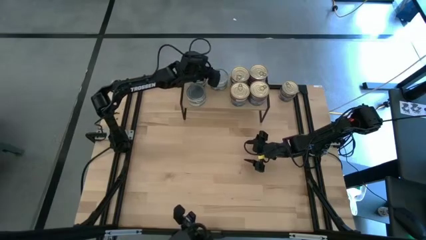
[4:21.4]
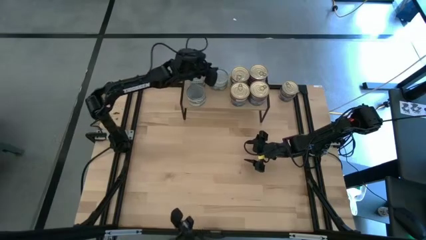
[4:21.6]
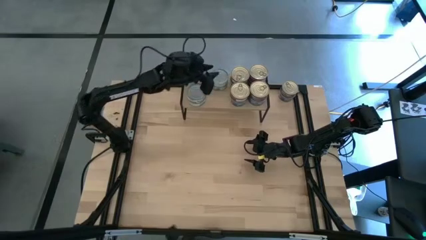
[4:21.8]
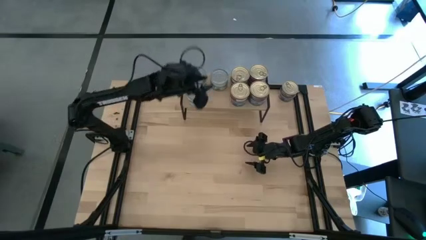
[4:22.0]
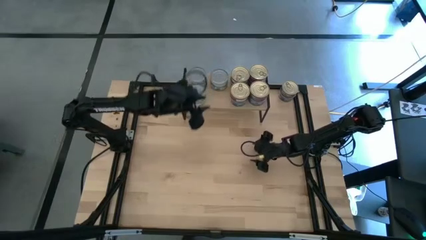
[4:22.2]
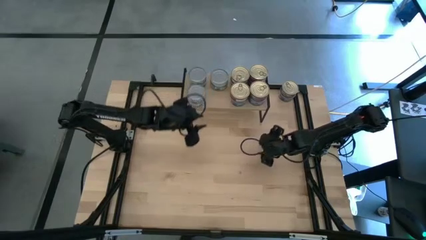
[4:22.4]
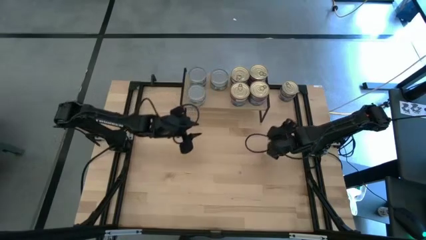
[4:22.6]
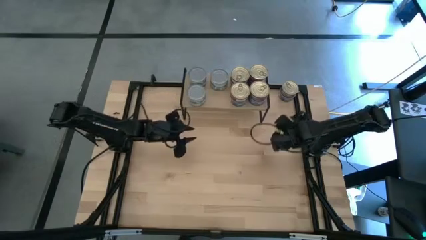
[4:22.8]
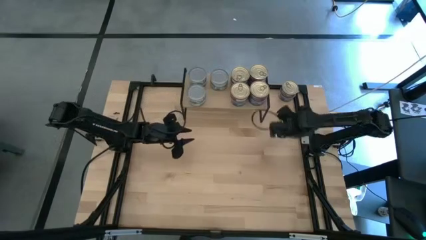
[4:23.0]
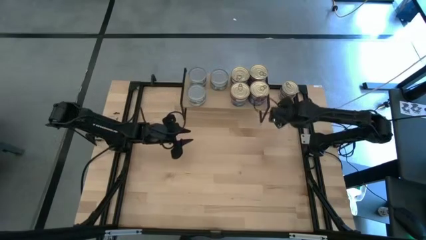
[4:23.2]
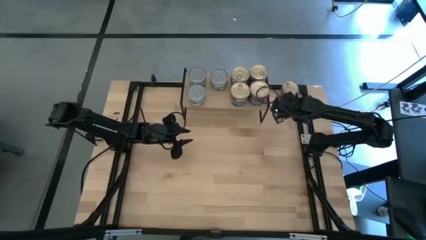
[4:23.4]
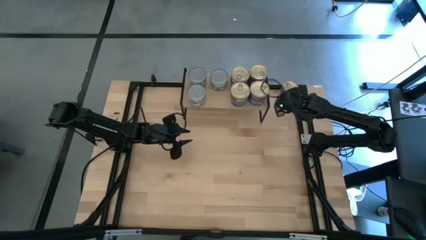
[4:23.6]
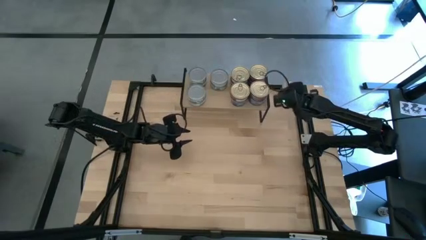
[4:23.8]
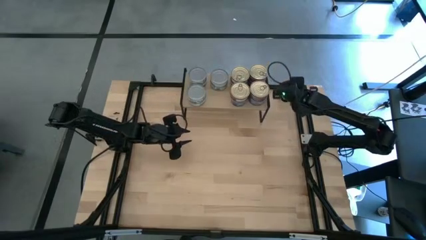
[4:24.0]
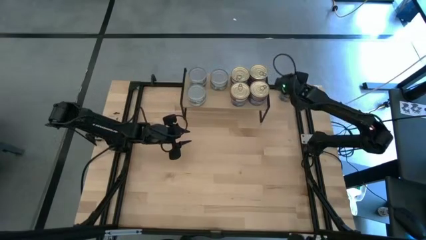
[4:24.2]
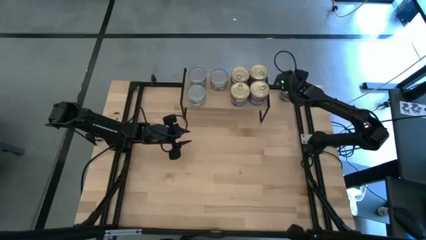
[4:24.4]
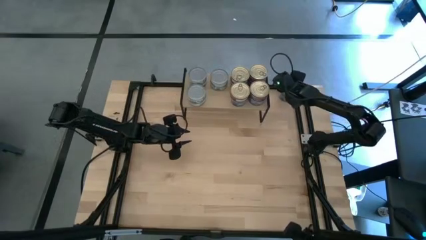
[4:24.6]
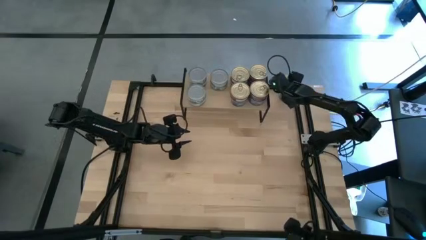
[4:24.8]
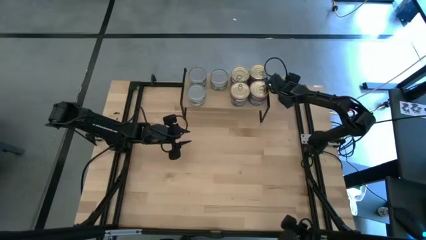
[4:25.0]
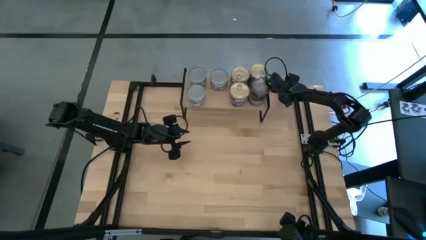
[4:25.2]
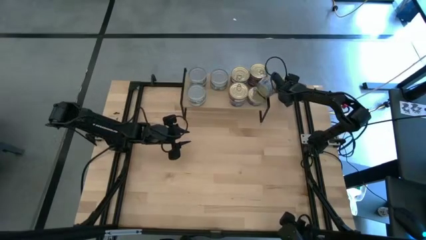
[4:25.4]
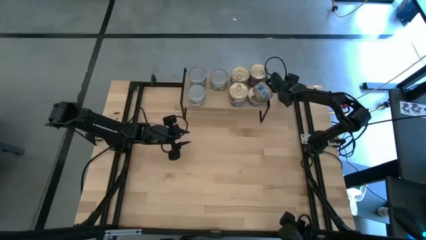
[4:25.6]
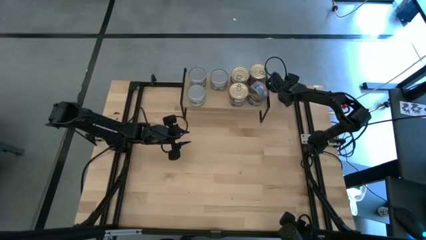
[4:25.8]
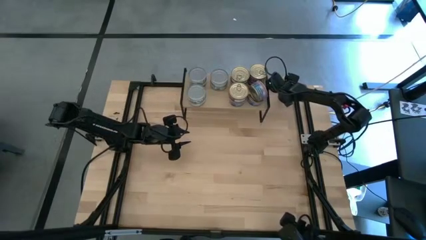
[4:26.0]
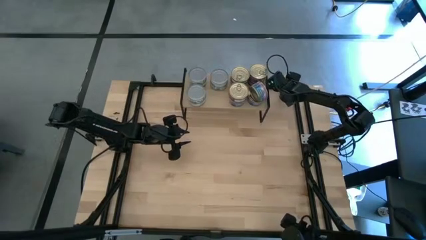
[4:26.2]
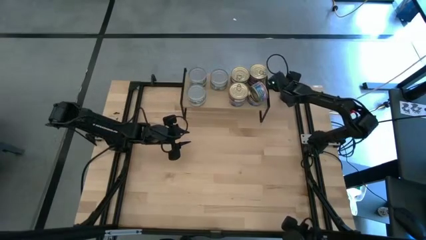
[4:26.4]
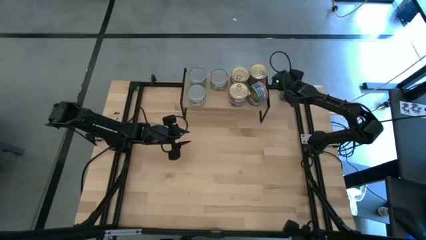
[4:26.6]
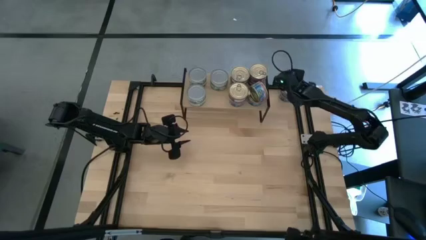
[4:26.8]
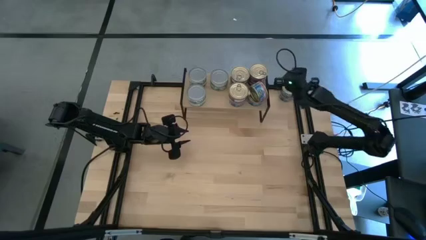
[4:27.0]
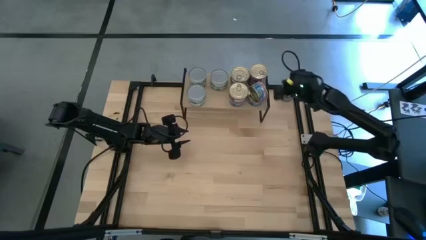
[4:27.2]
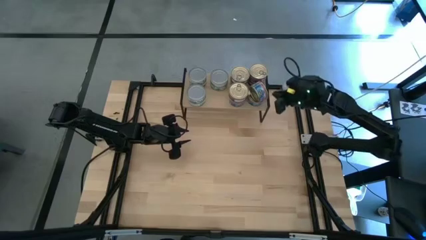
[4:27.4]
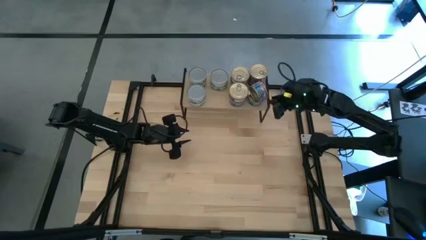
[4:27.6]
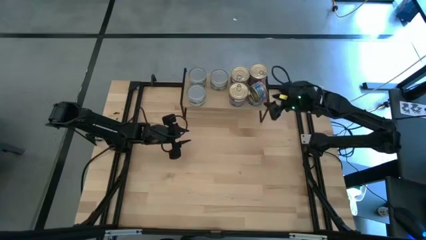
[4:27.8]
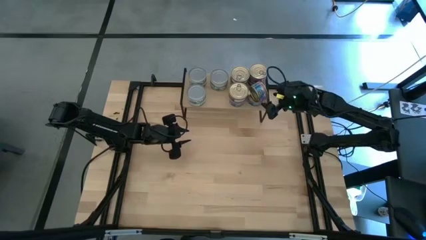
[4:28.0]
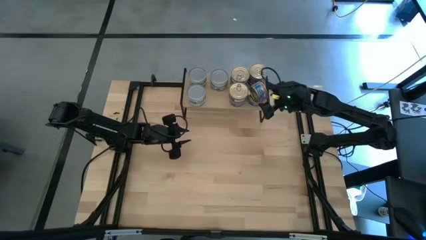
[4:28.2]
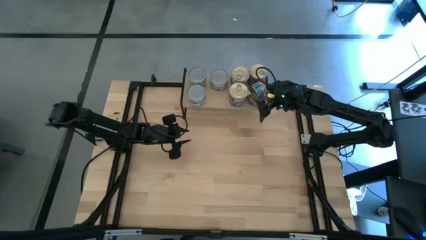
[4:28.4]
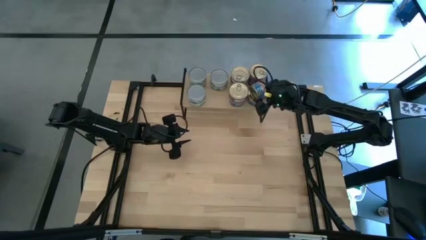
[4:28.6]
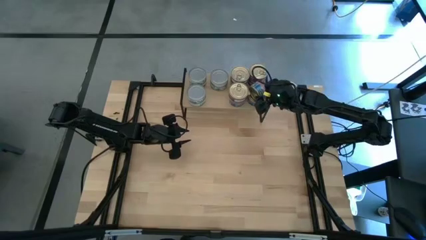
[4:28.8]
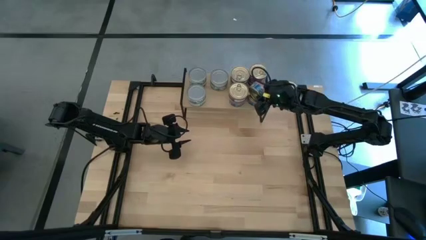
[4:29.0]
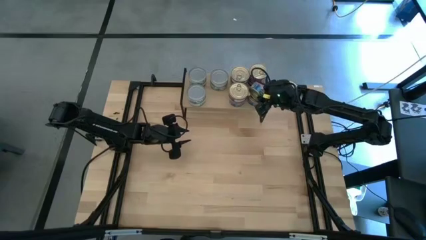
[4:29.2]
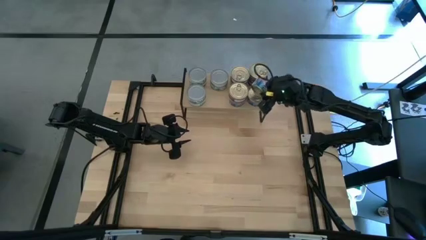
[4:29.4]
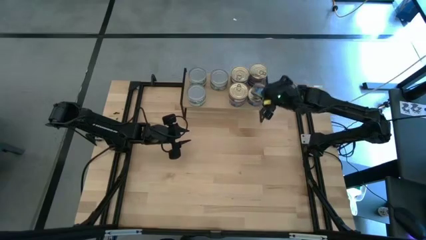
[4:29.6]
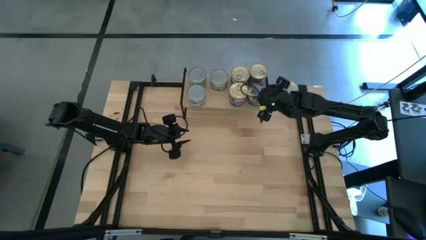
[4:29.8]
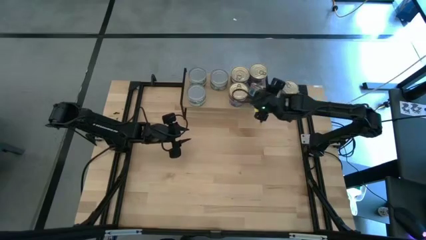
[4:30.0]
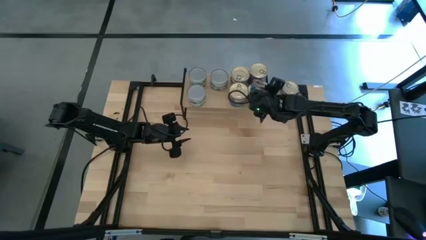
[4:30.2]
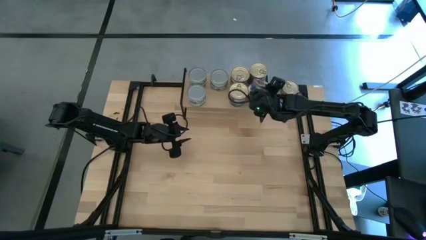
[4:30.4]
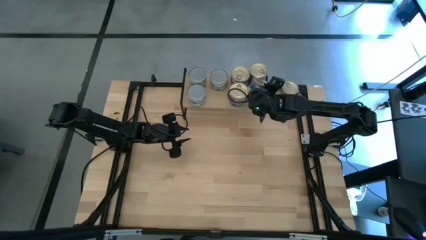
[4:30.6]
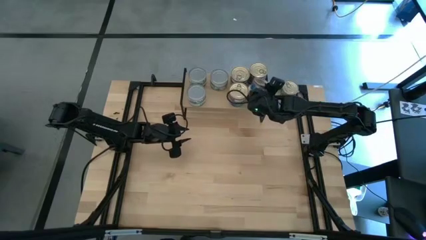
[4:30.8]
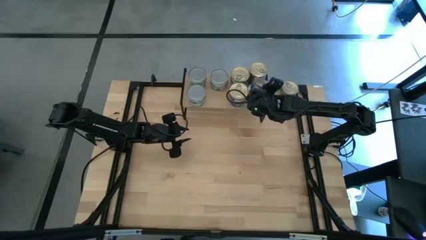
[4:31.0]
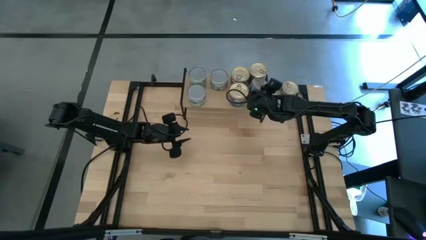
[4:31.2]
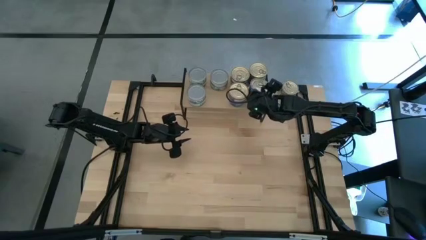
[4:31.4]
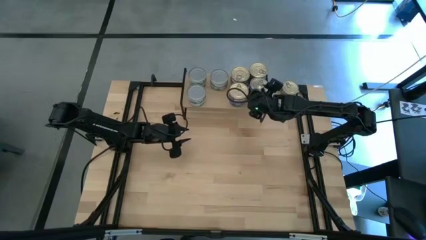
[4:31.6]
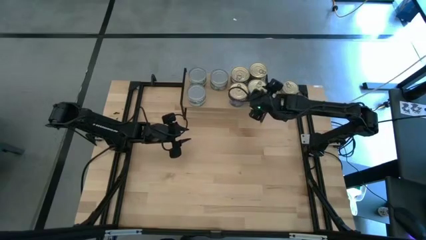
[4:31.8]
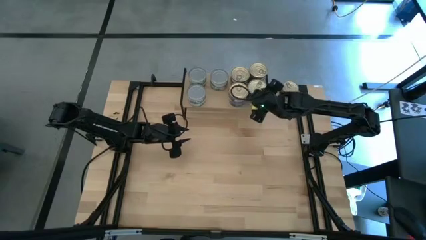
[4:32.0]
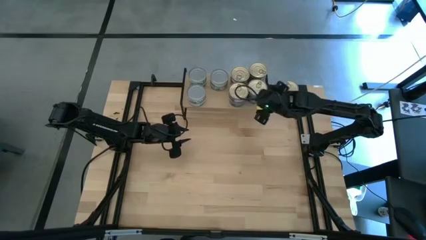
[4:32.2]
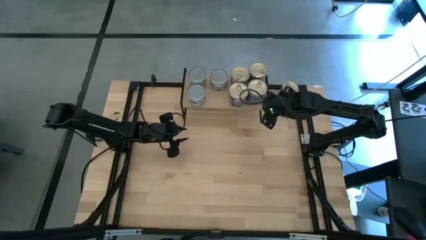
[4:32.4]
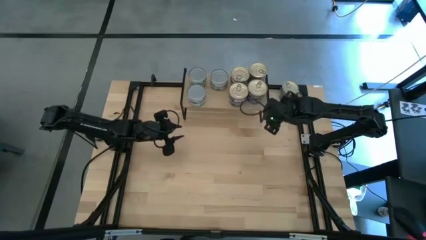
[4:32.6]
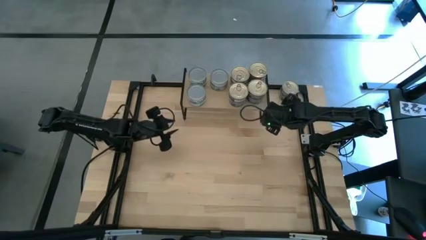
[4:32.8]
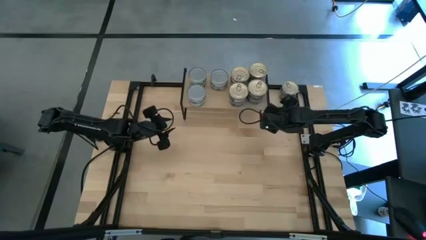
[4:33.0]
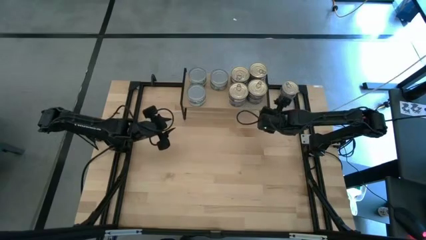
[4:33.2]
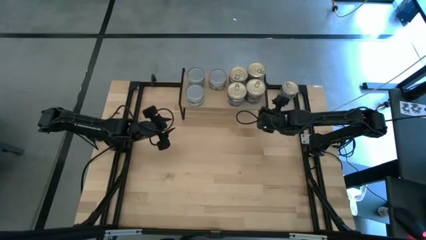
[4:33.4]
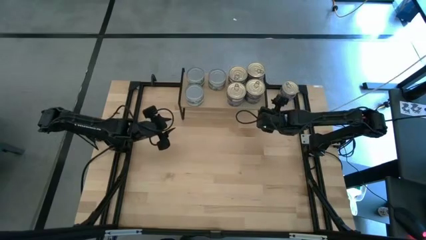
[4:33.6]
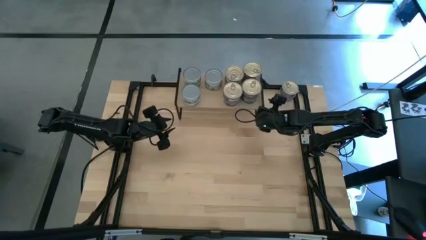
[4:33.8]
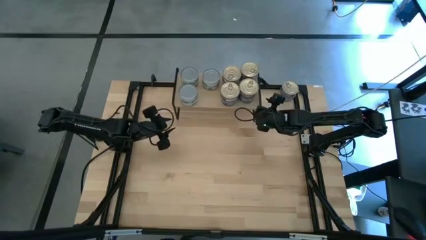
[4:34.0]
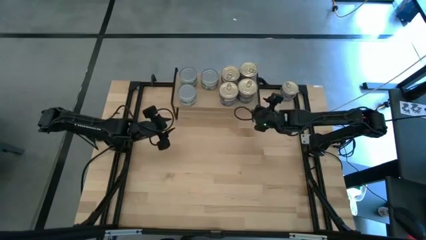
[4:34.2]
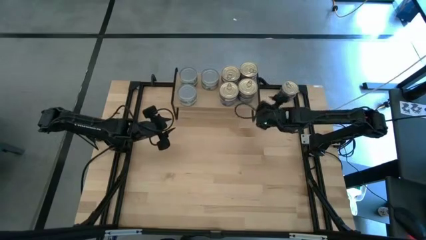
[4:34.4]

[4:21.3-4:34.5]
Task: Stack canned seafood by type on shelf
Adjust the blue pink tuna can

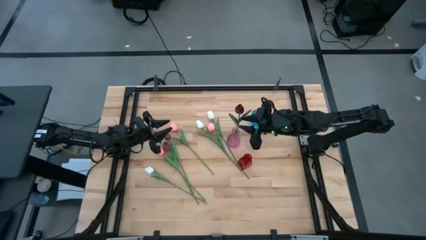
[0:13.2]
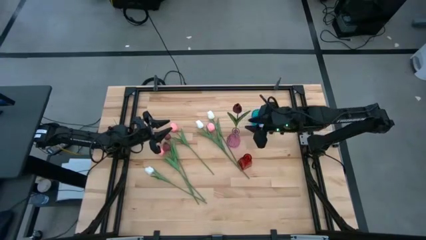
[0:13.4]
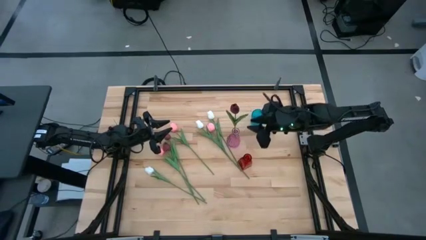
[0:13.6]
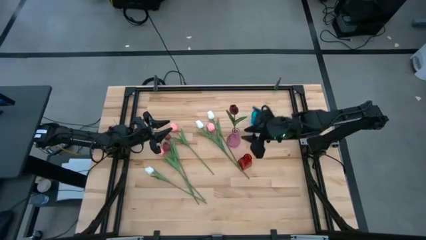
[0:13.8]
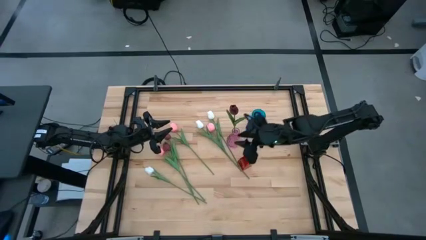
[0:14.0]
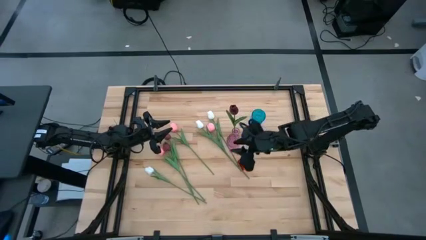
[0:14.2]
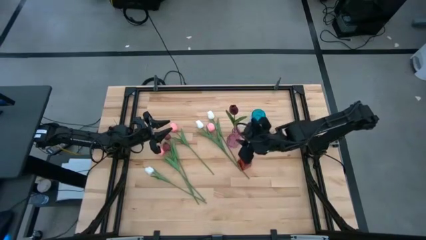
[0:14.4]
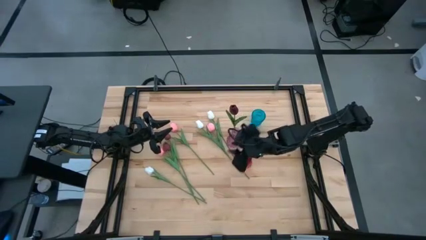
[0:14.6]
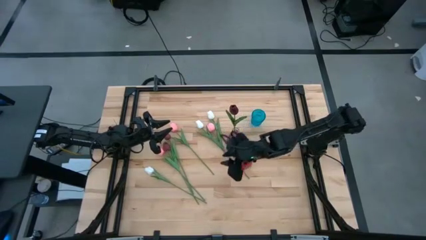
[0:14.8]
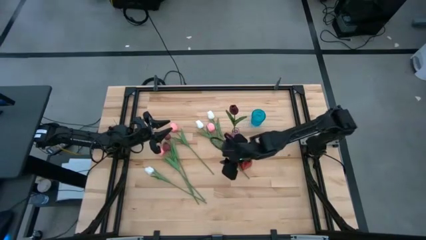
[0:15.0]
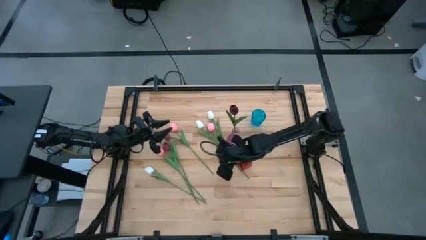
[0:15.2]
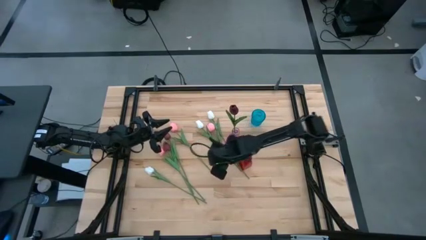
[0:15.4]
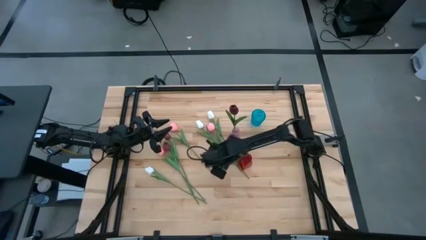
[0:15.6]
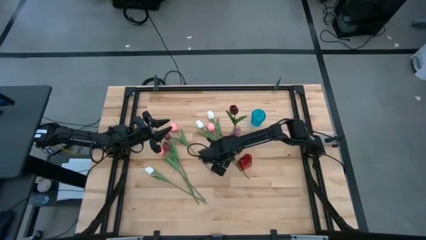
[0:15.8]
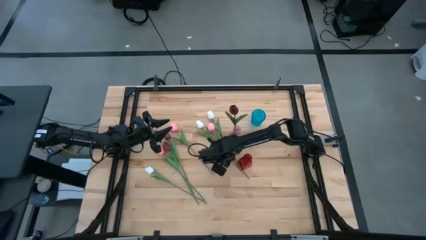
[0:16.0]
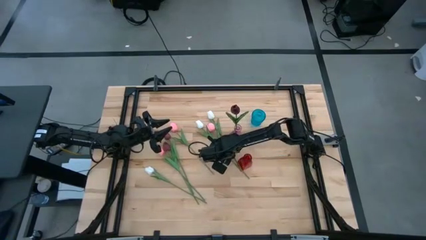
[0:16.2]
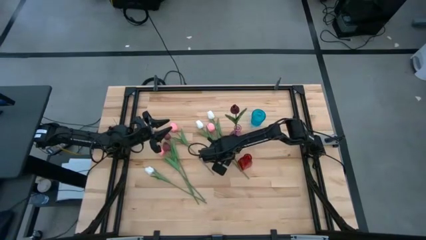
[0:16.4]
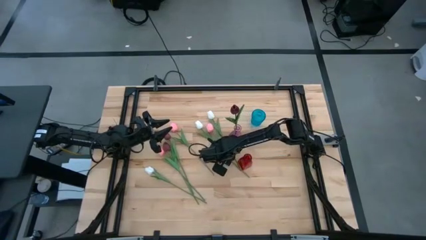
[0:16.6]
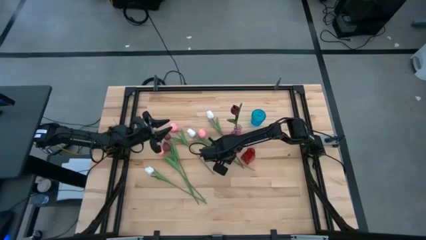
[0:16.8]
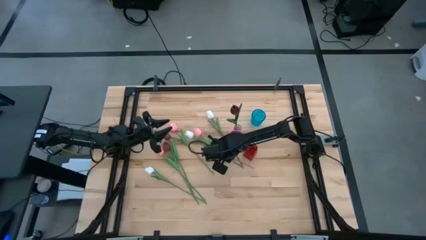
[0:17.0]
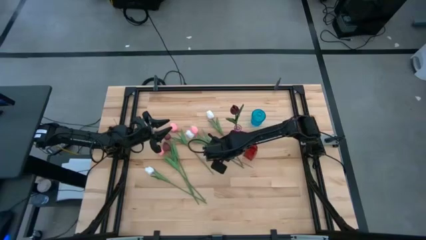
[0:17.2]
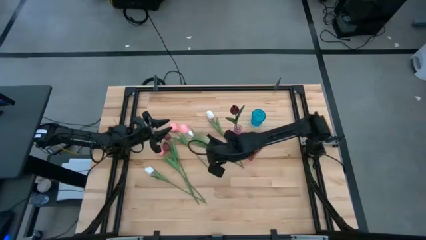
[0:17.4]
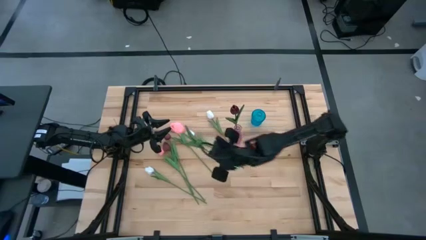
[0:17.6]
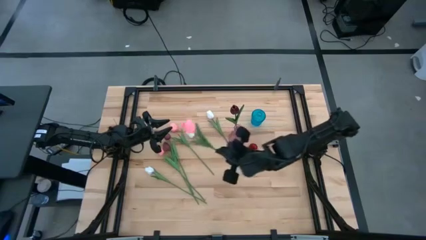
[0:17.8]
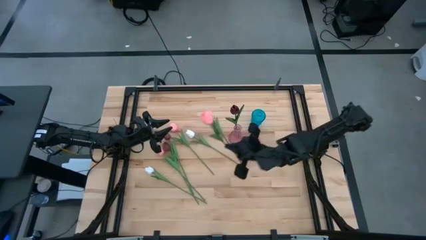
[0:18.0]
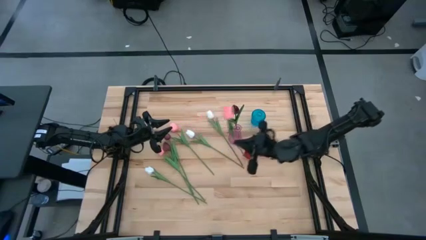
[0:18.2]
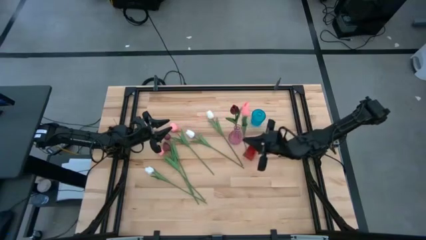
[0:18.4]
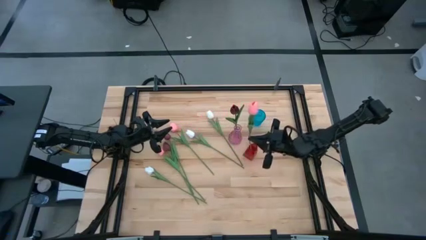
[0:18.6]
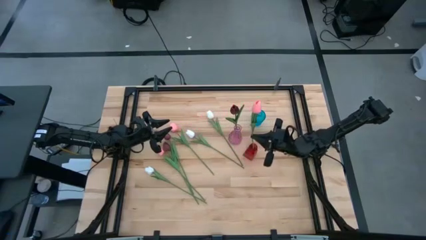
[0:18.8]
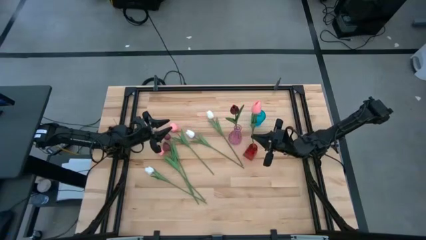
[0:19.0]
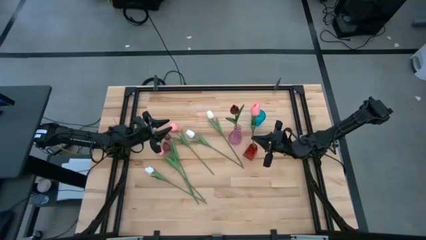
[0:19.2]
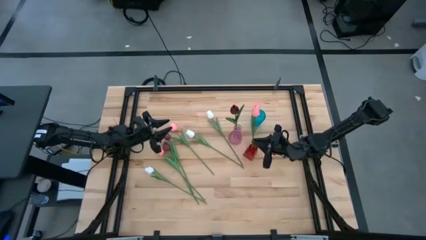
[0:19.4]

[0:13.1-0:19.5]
Task: Sort flowers into vase by color
Put the right pink flower into the red vase
